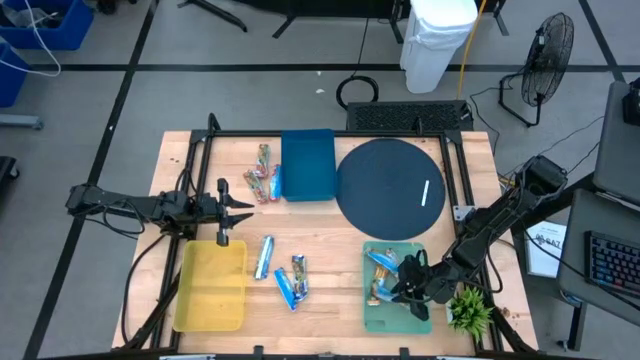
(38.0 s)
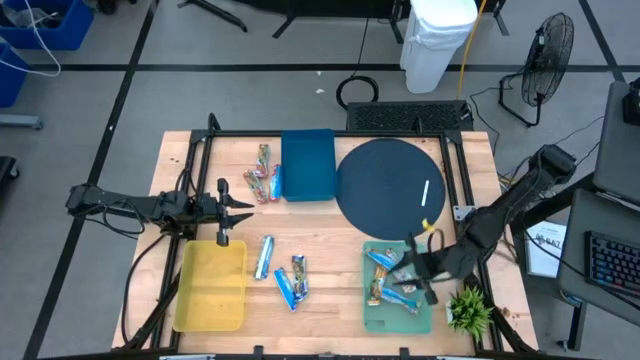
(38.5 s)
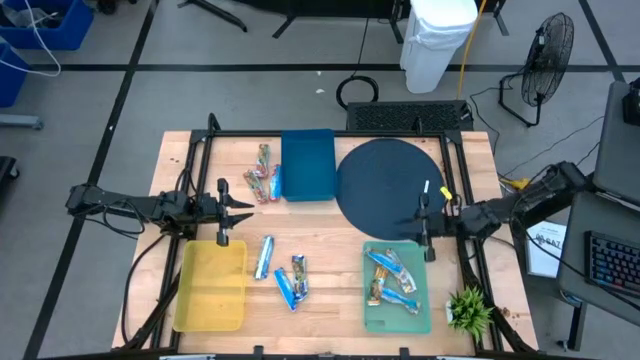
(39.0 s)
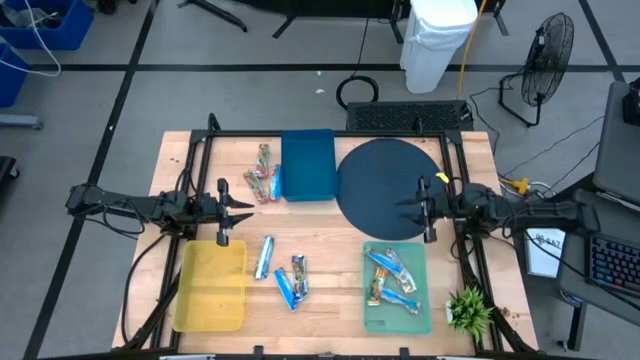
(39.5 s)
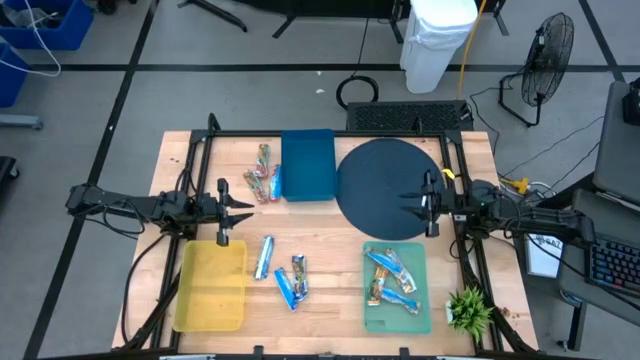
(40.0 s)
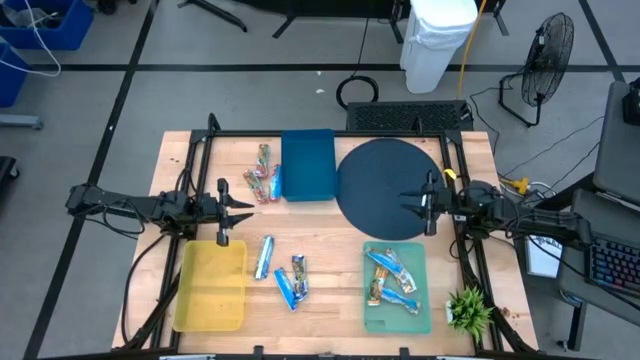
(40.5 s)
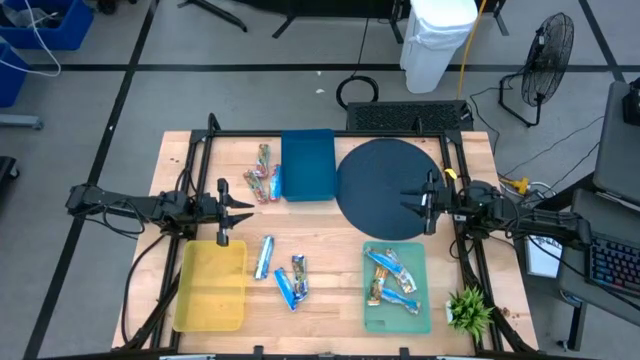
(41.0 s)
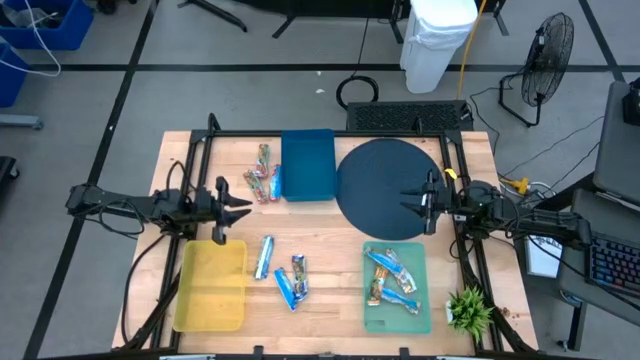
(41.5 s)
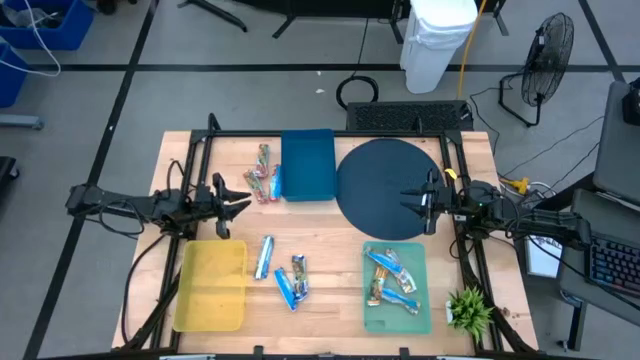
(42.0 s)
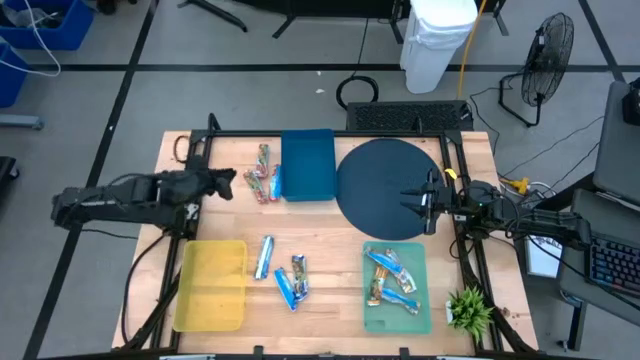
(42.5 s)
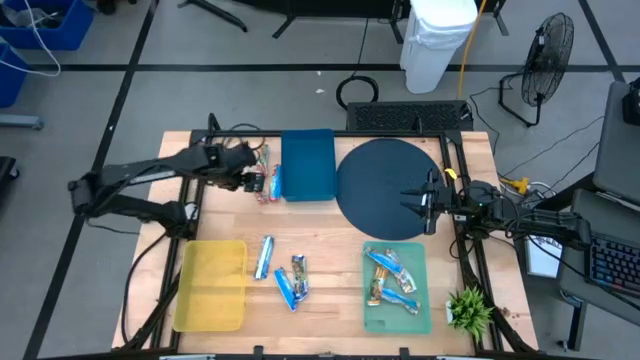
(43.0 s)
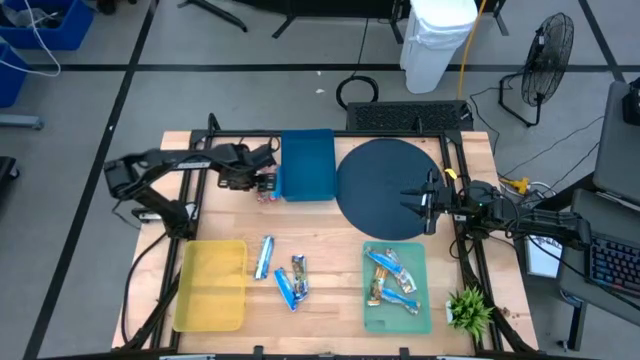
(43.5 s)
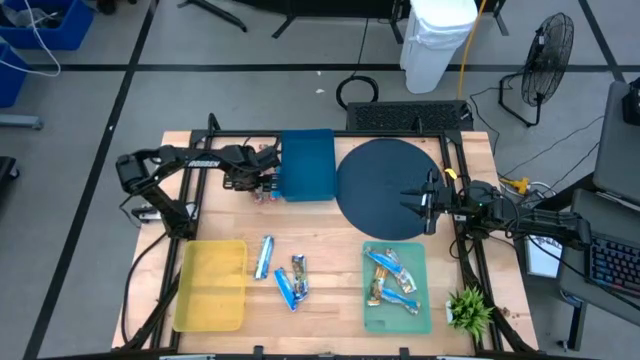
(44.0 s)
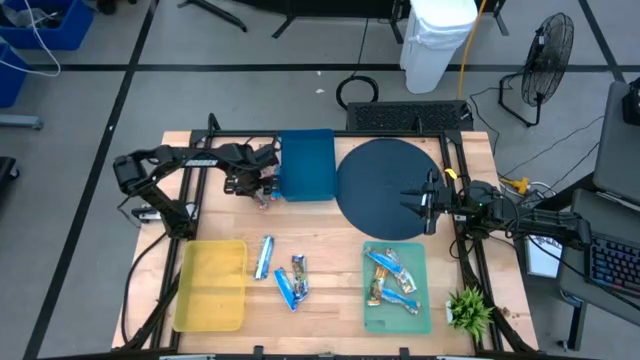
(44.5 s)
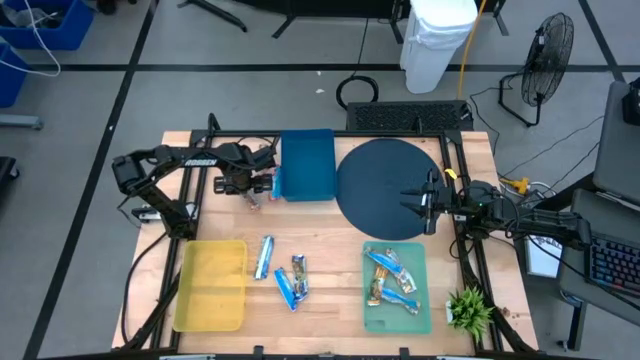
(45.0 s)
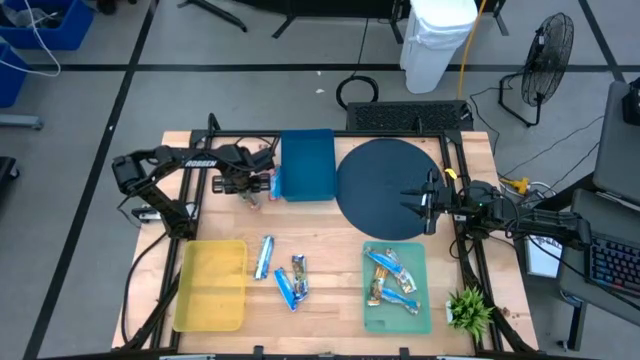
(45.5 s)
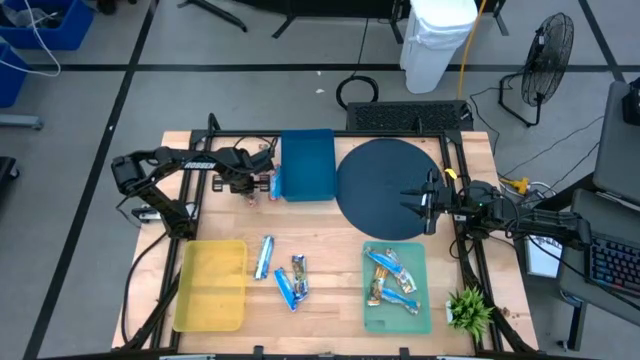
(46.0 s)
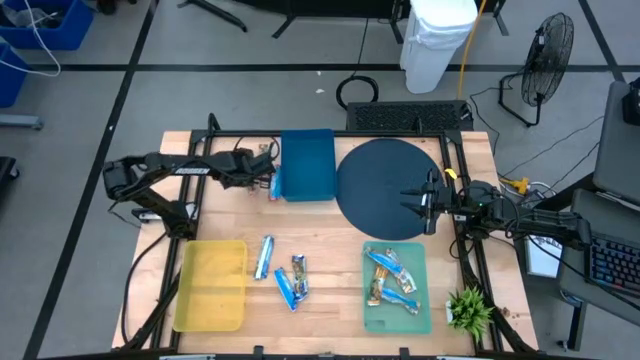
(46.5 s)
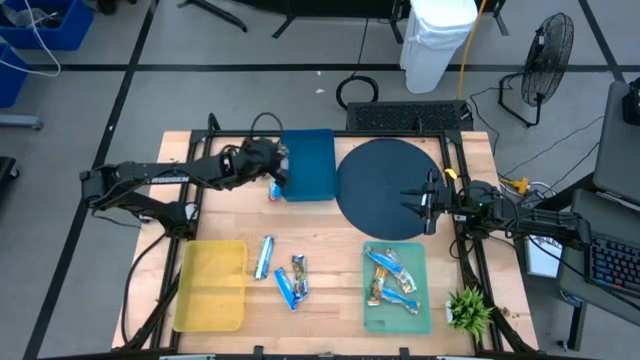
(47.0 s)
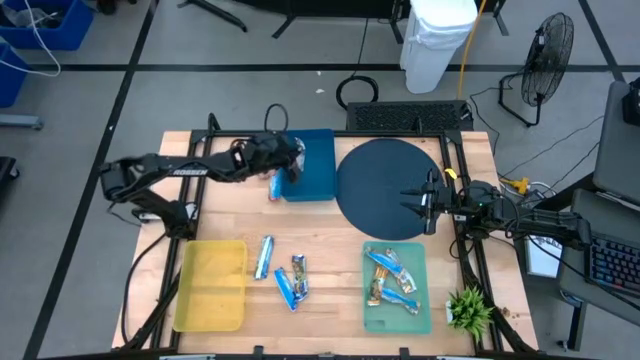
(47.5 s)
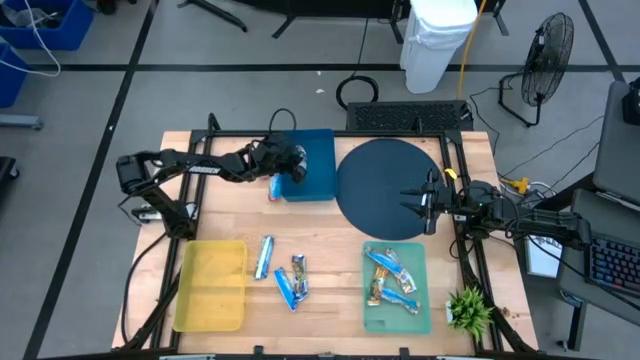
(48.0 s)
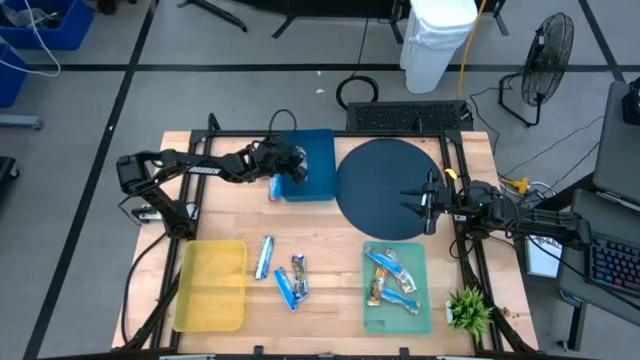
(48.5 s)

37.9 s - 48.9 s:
Task: Pick and place Granola Bars by type
Put the red granola bar into the blue bin

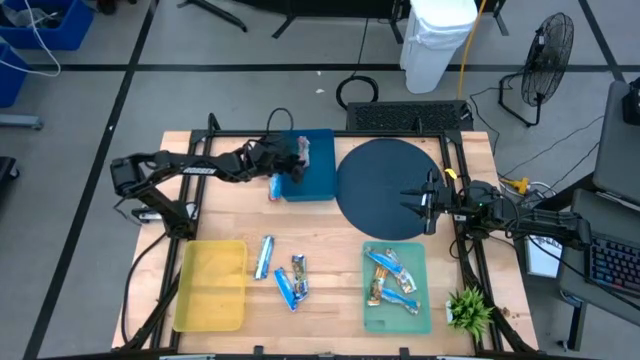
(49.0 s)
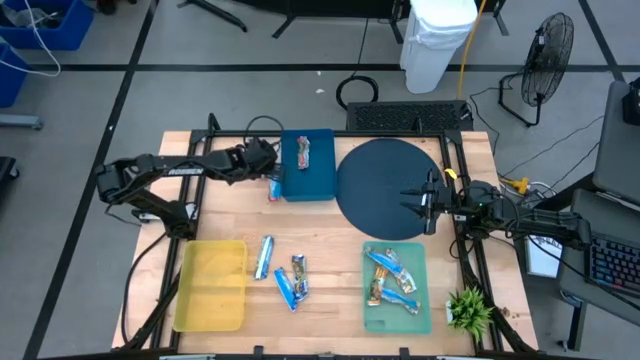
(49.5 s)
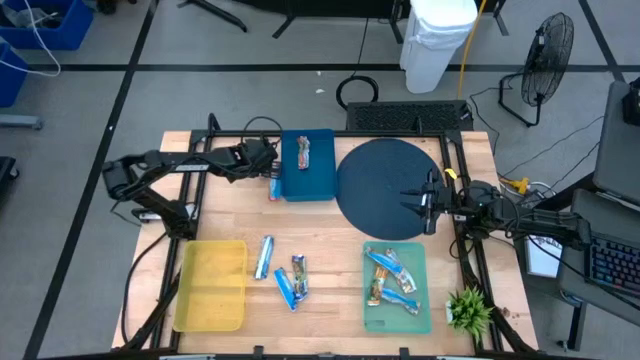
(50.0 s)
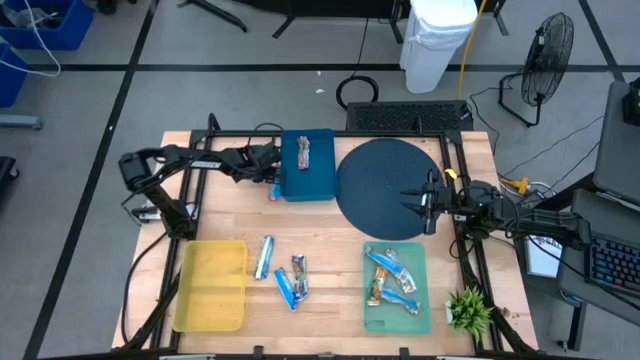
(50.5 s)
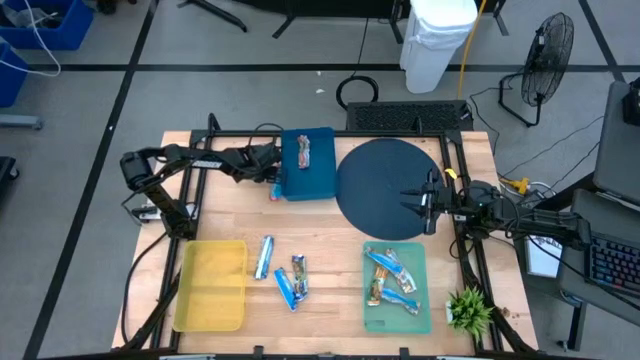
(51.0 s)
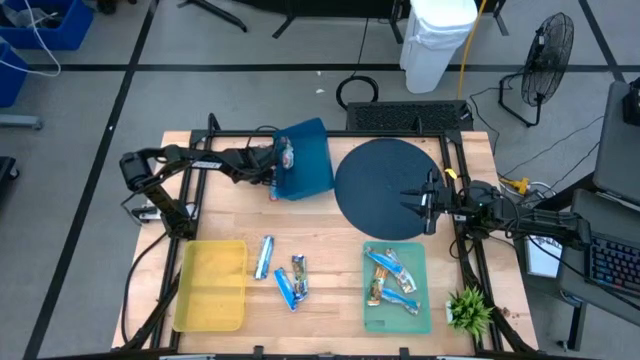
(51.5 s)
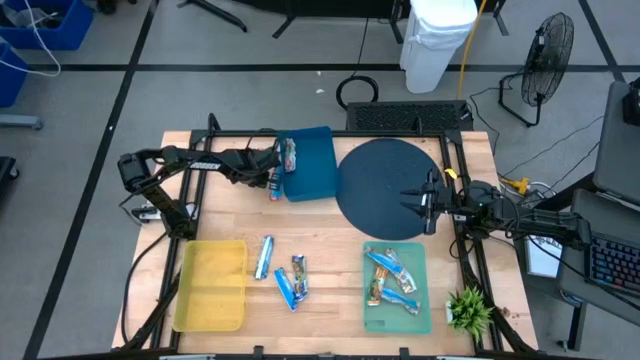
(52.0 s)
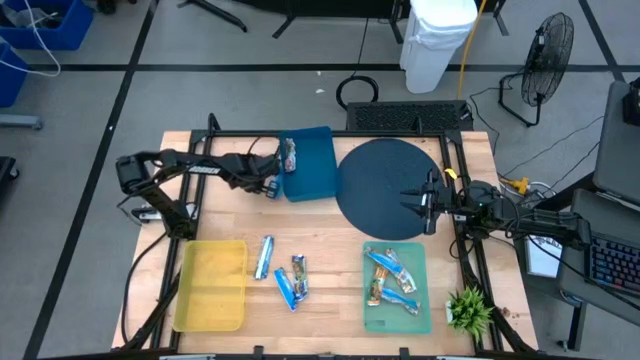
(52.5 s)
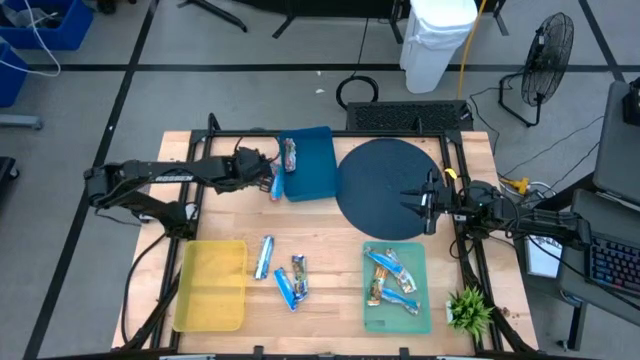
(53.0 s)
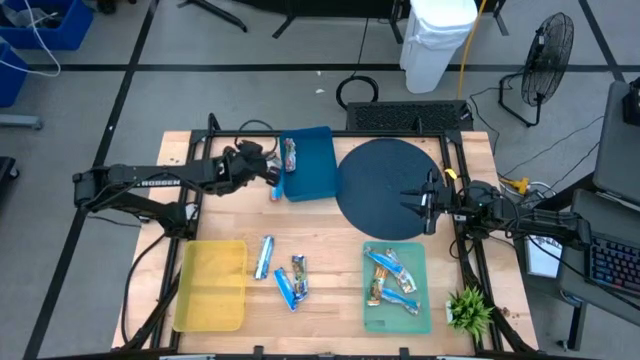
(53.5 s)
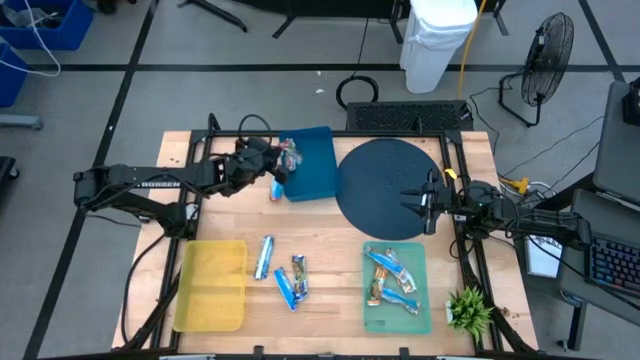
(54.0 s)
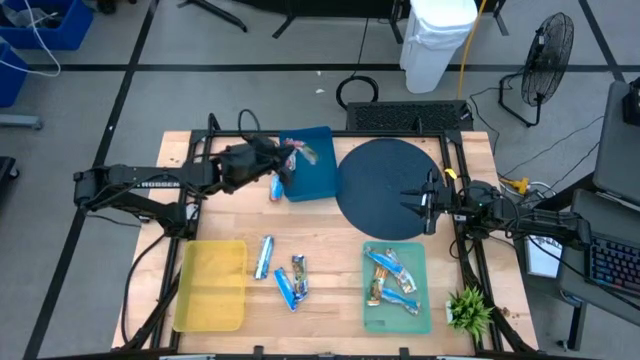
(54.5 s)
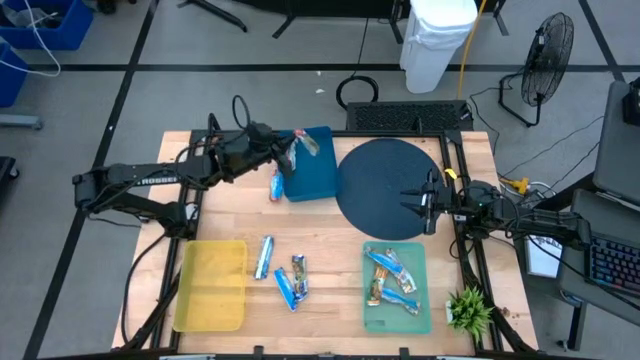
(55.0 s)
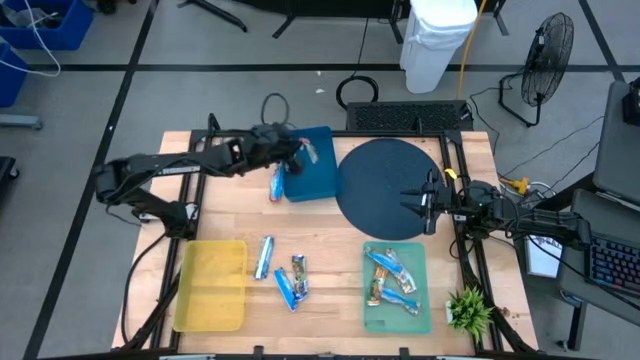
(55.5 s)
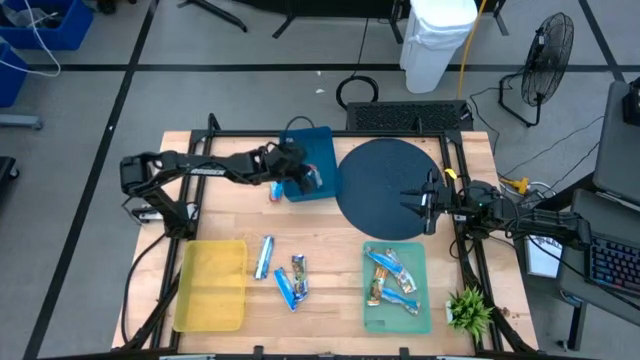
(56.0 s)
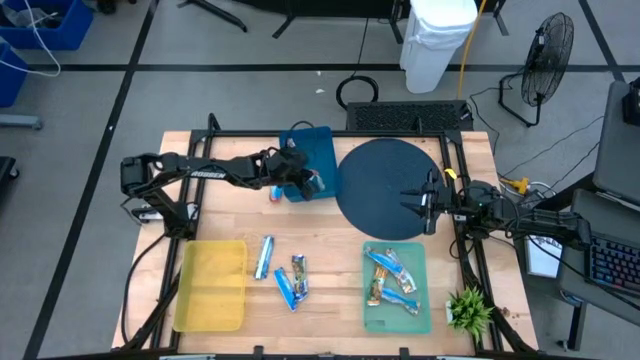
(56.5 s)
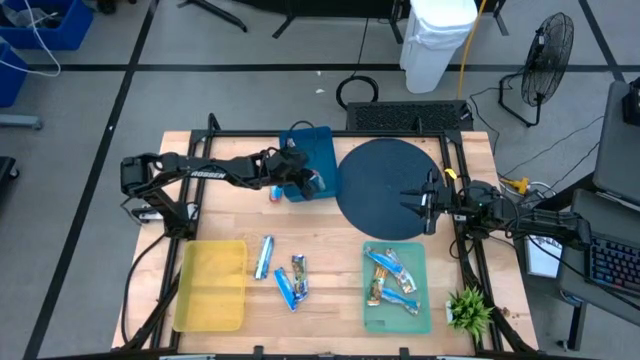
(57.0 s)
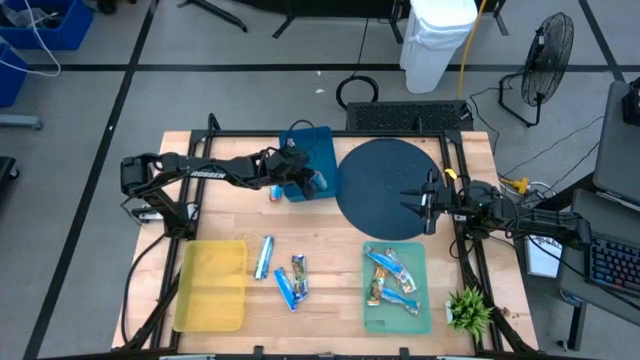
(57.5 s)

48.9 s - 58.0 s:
Put the red granola bar into the blue bin

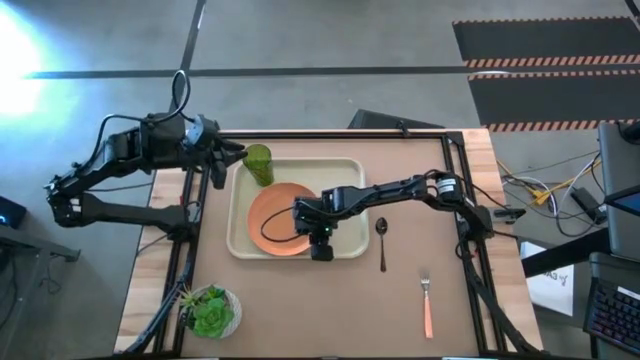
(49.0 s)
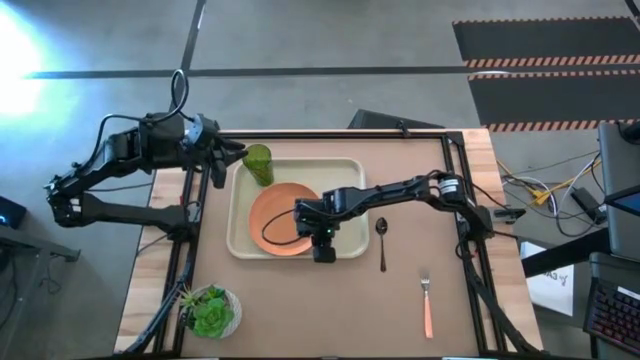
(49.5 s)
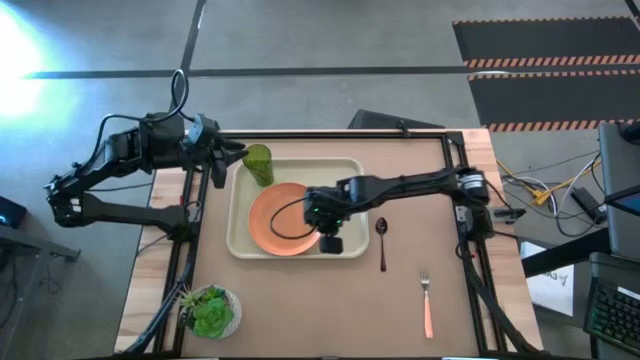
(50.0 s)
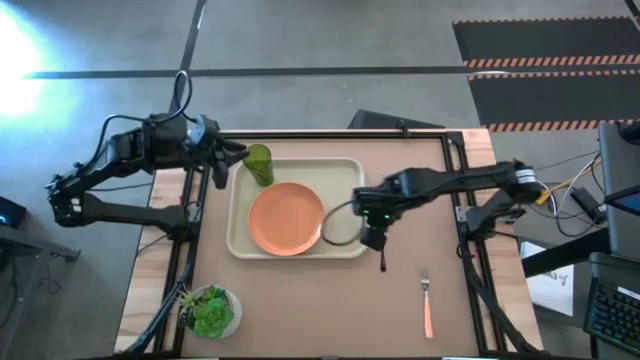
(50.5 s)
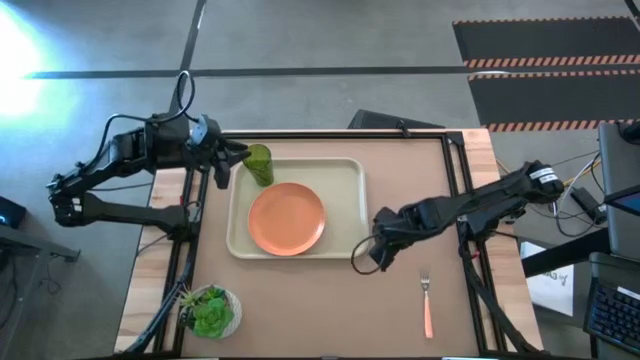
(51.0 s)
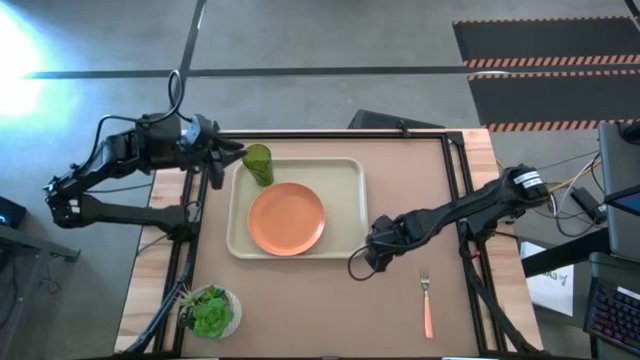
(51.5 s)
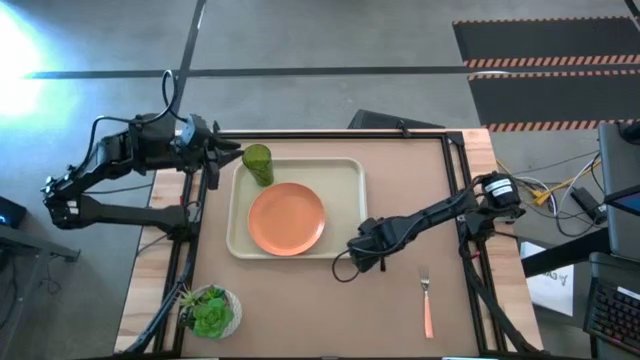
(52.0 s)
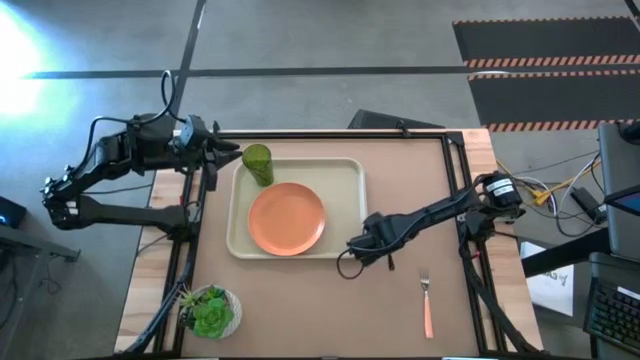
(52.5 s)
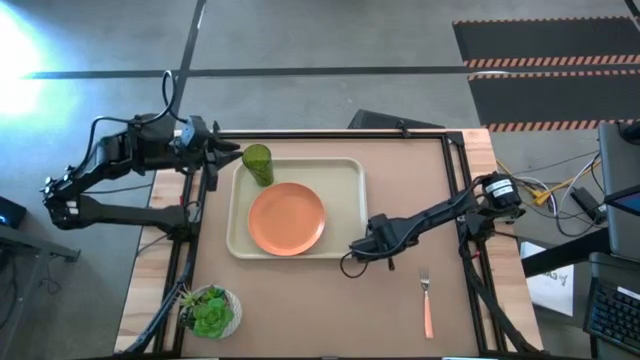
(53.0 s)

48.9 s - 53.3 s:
Task: Pick and place plate/cup/fork/spoon on tray
Put the black spoon on the white serving tray to the right of the orange plate
